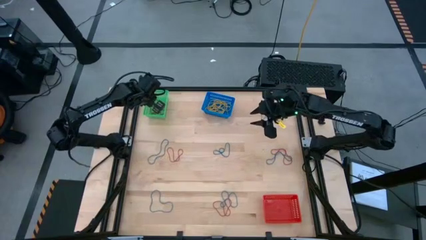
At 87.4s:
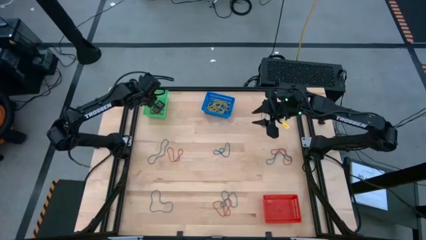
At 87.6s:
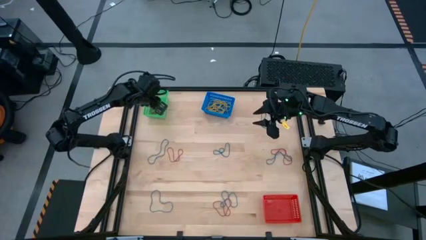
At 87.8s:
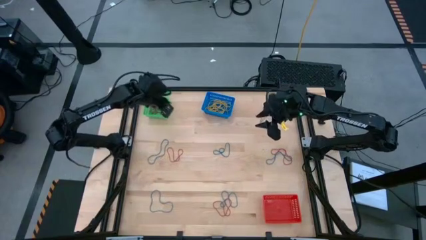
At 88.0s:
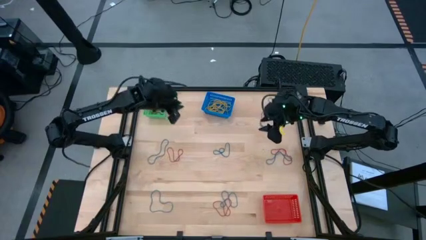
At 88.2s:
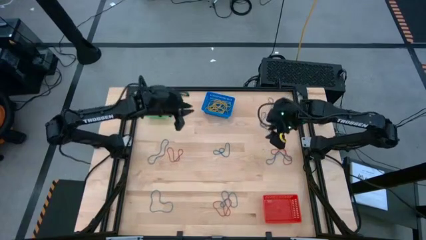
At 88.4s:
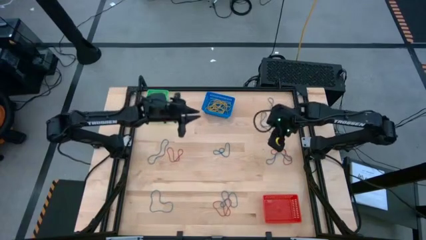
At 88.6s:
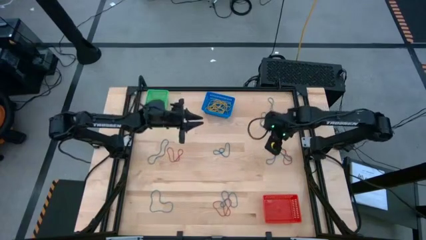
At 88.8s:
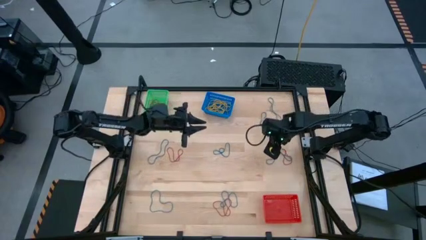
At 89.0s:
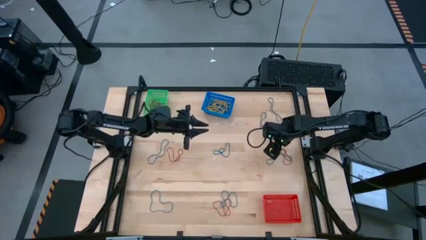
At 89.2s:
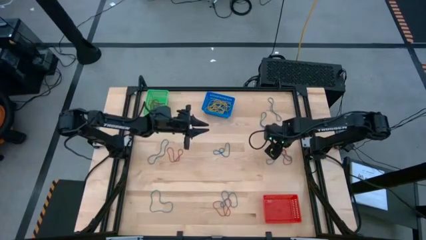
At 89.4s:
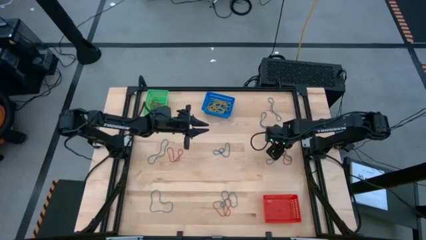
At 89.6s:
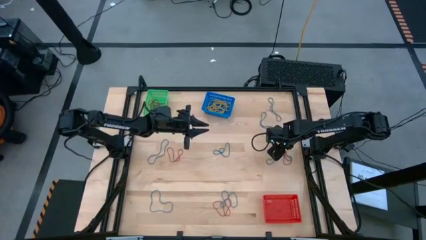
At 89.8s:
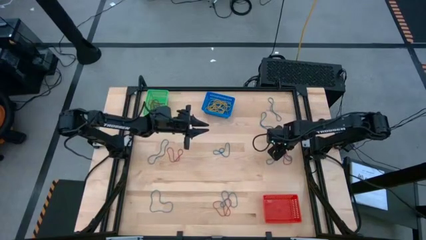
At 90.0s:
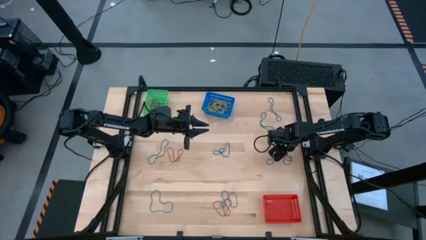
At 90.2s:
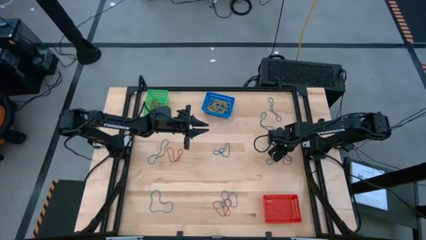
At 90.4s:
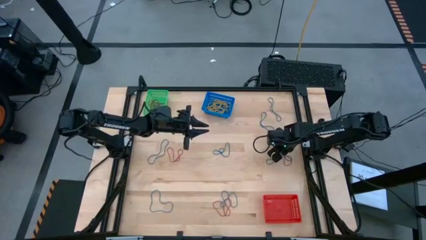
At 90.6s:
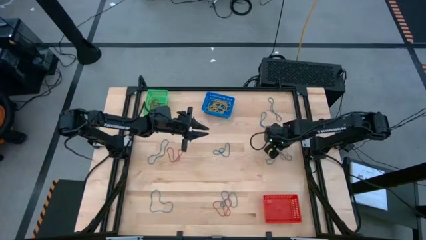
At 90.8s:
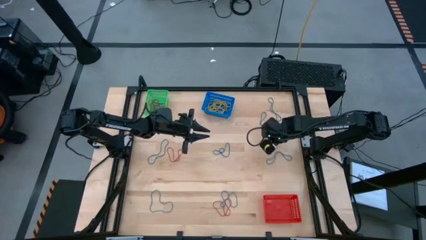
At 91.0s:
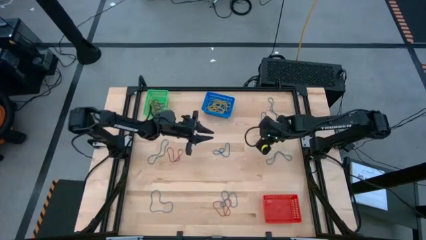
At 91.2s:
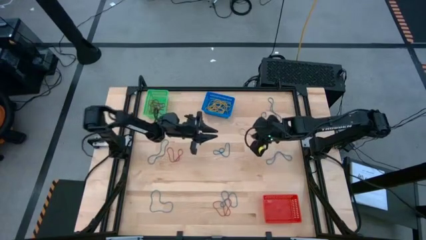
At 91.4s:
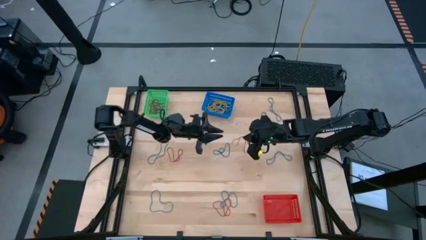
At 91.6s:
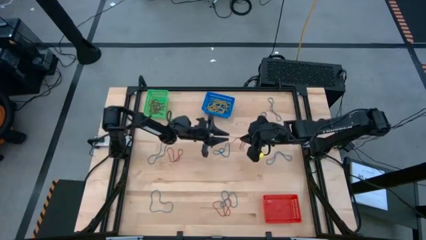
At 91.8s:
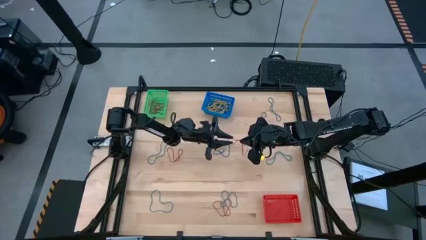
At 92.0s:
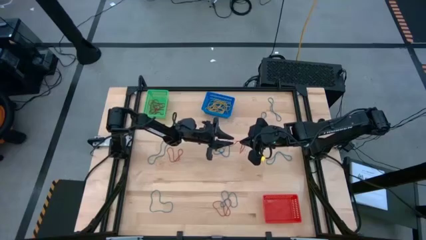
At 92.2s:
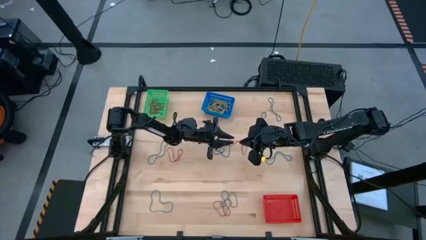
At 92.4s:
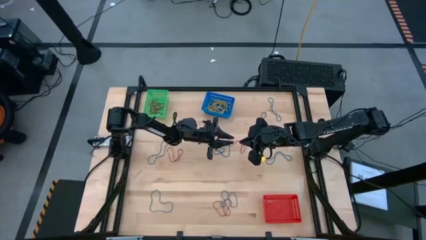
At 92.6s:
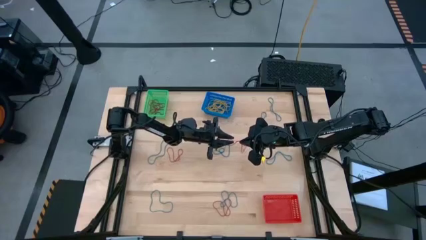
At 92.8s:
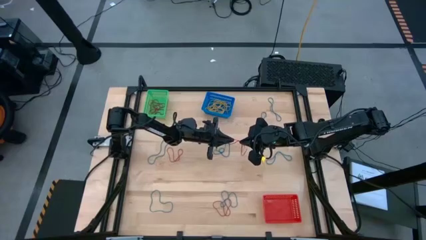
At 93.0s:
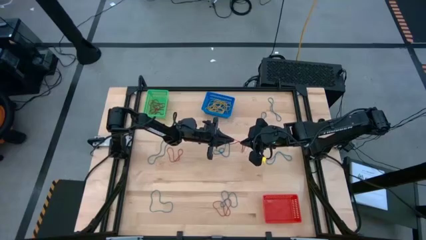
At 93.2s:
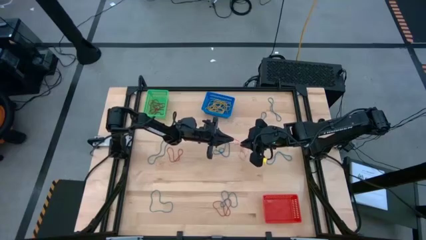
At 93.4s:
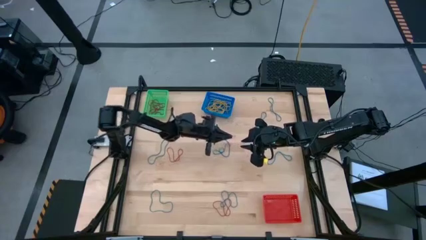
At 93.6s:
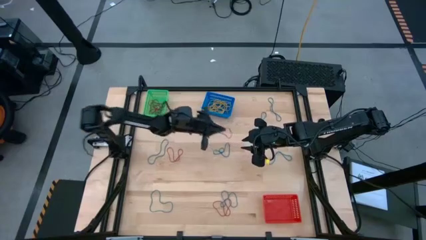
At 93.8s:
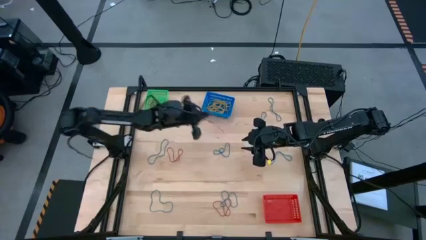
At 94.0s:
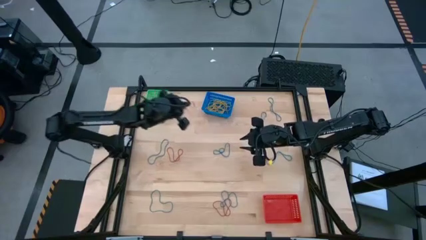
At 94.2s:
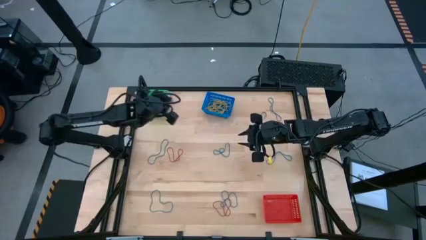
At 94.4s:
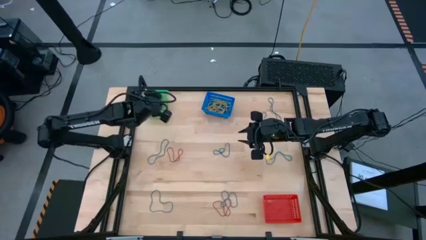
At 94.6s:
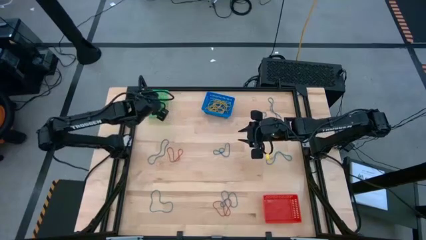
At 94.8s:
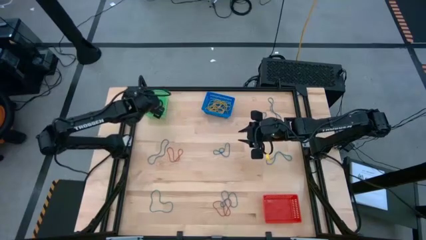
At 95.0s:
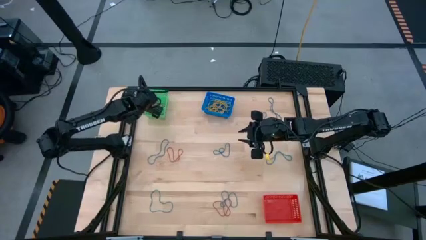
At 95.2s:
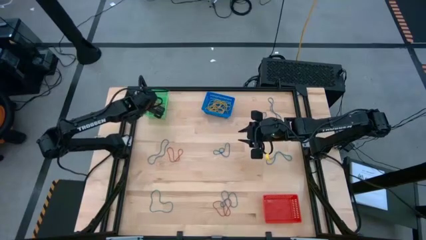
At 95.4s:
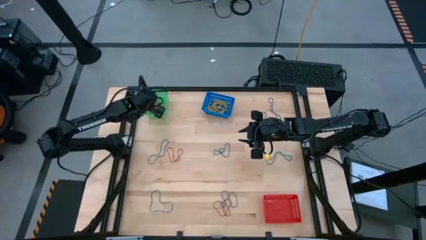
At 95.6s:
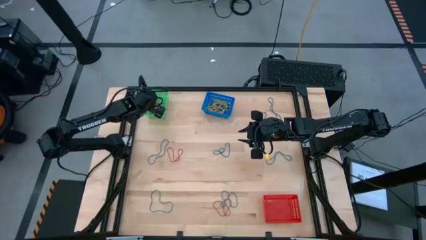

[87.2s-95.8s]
Task: Sort rubber bands into baskets
Put the red rubber band into the green bin

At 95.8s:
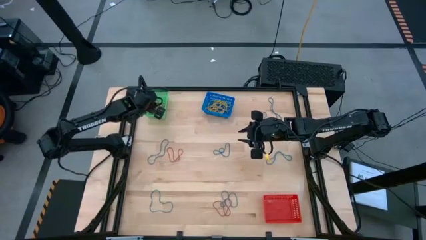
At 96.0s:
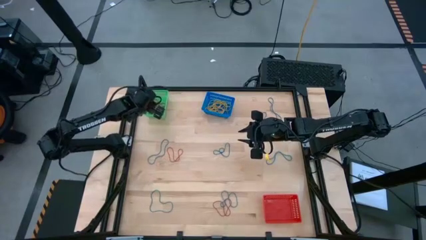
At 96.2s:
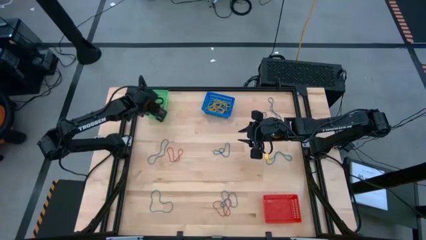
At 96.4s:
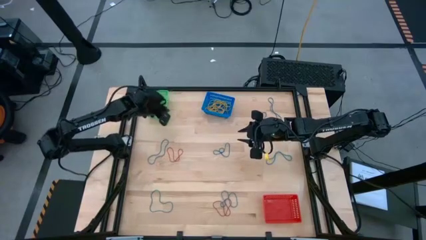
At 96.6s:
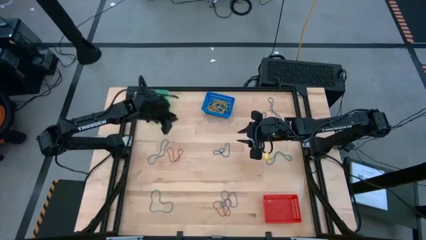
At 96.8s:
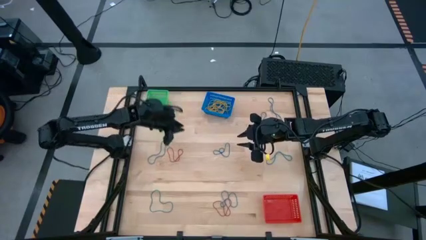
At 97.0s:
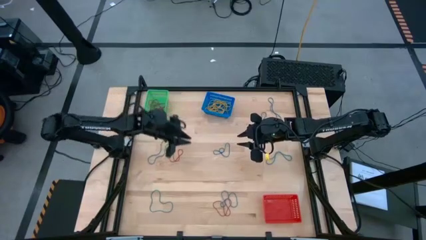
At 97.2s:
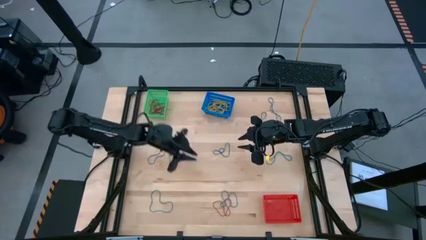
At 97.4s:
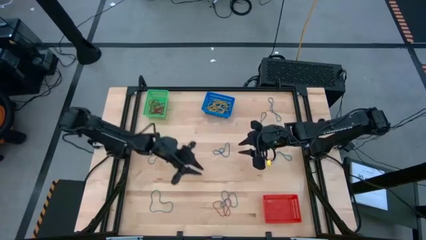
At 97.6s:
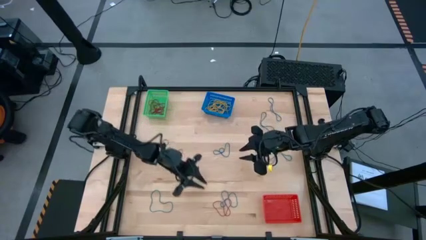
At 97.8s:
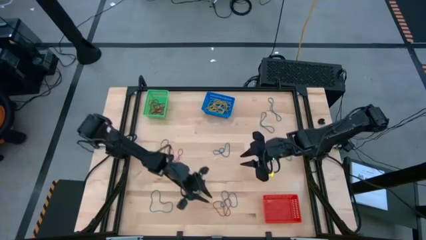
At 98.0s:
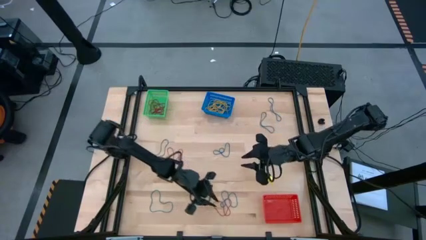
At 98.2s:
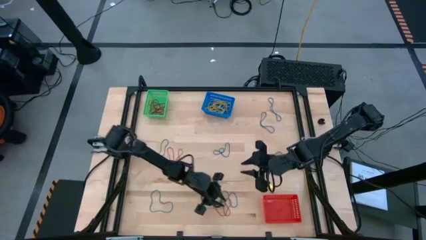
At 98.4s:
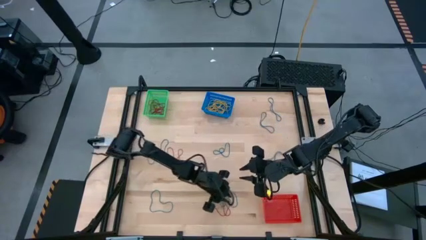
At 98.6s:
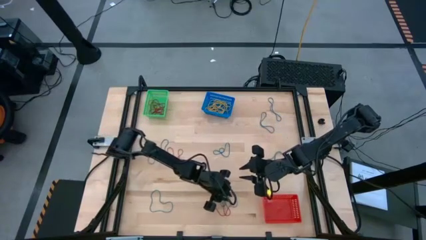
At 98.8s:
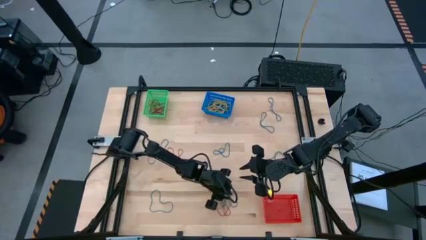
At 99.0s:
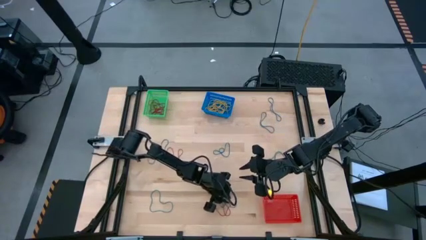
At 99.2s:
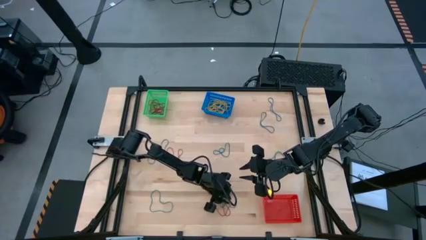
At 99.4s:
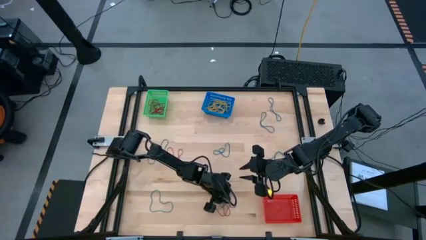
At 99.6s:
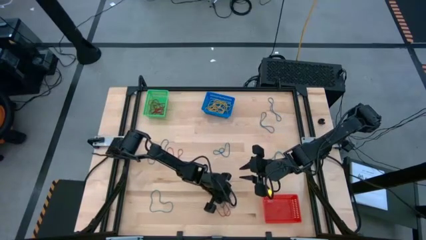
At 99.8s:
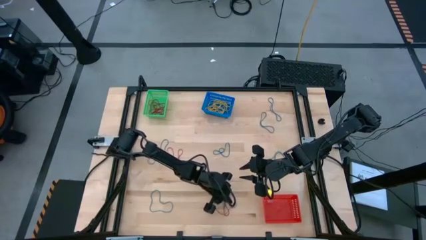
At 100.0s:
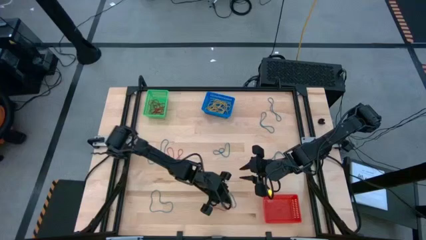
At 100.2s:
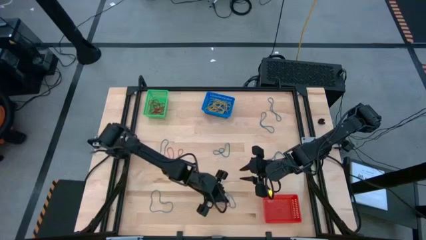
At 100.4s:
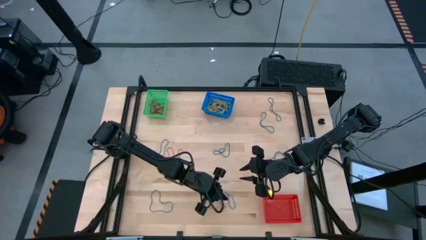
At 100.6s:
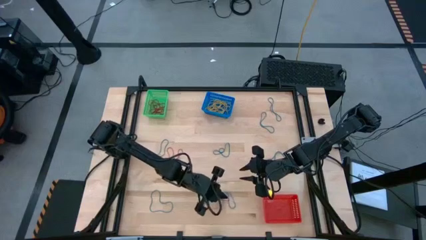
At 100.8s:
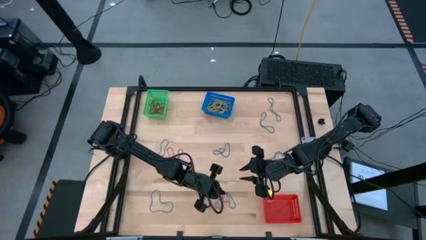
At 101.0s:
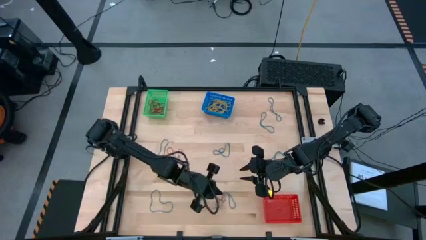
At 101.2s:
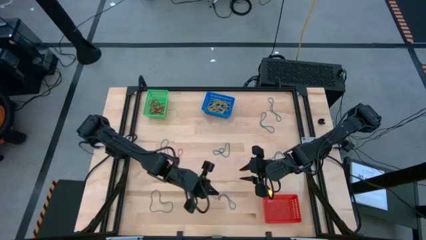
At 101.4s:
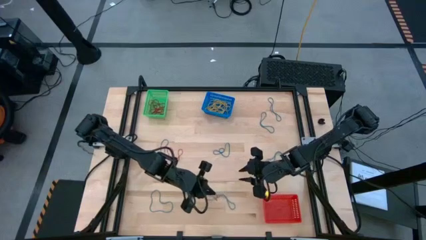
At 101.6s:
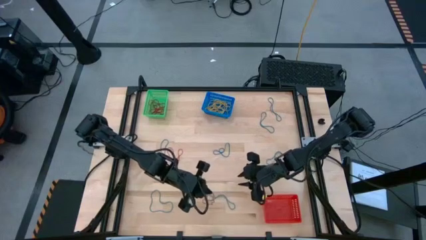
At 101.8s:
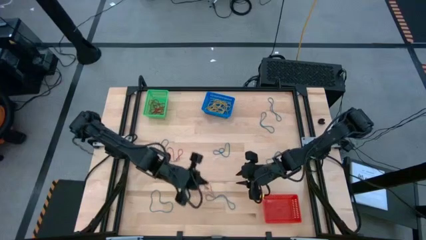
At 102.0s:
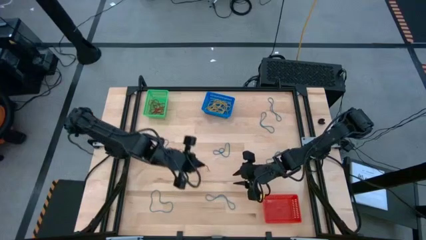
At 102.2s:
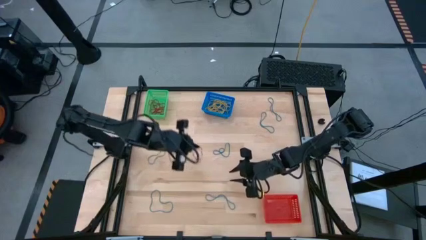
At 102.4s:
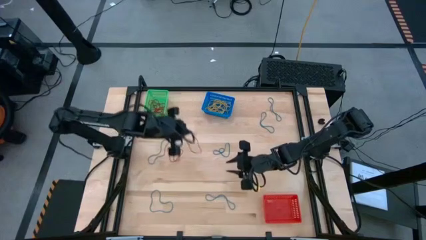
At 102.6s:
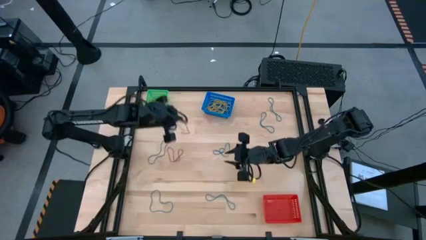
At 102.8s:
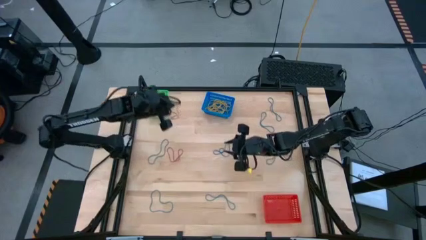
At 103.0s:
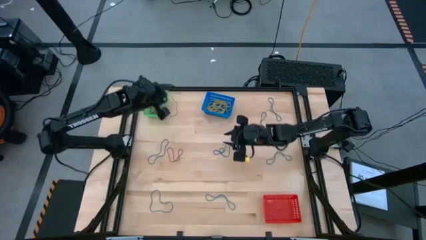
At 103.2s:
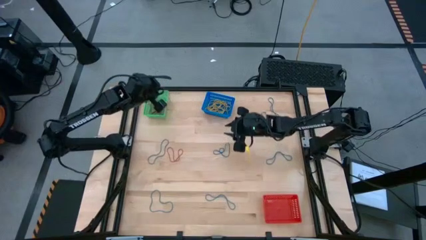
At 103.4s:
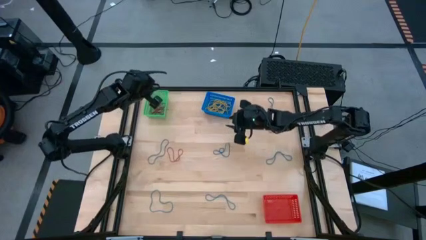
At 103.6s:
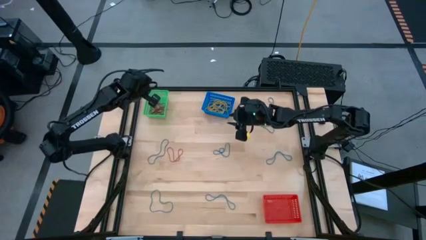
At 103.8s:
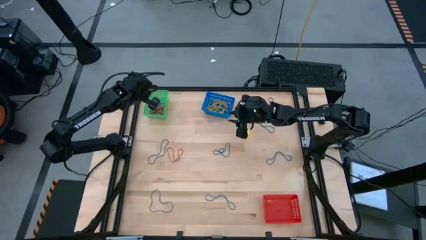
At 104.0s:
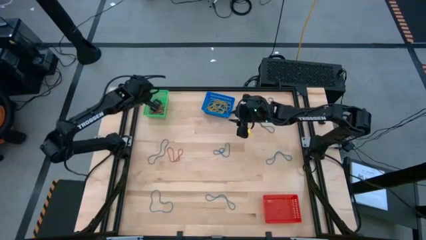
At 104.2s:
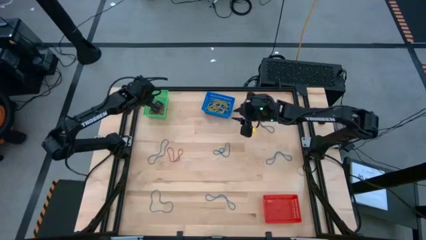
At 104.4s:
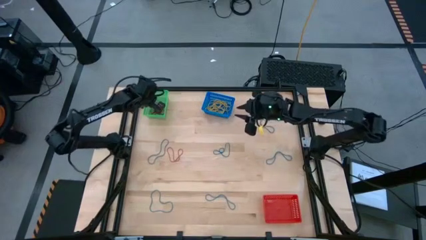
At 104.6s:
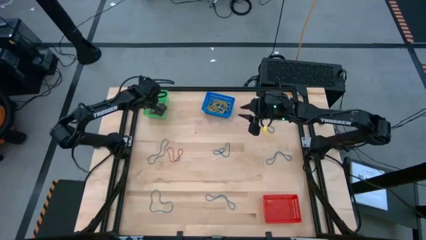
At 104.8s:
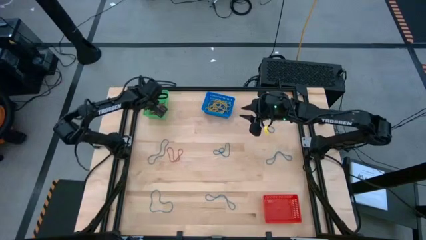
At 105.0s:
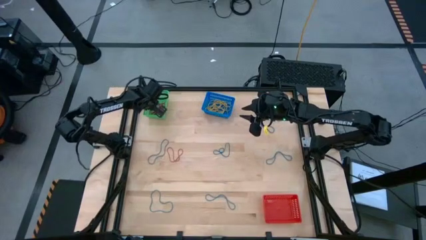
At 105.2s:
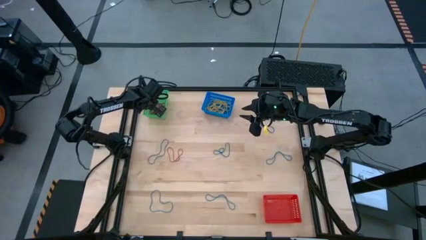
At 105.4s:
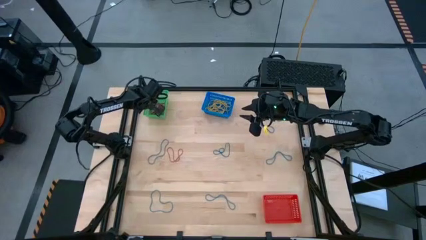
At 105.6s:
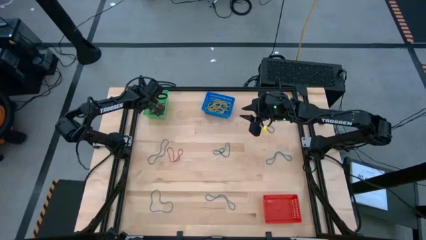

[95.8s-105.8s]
Put the red rubber band into the green bin
